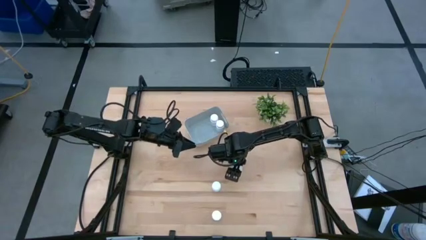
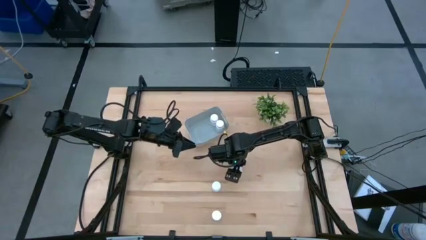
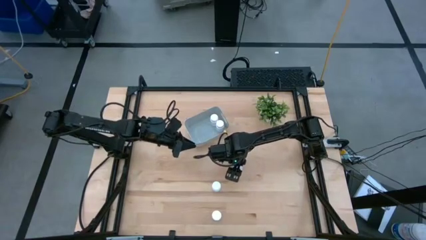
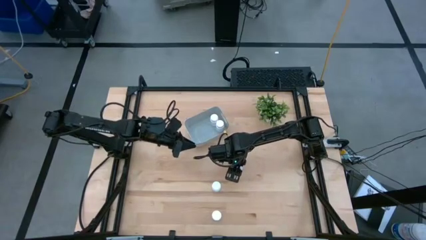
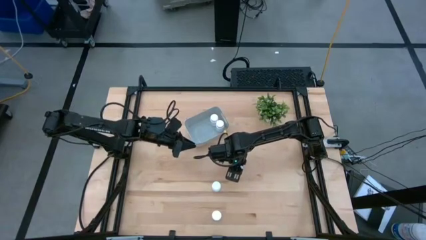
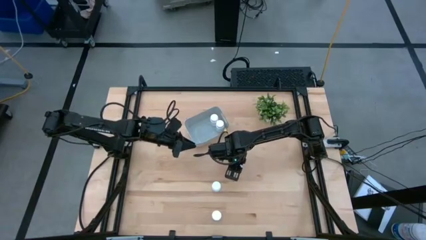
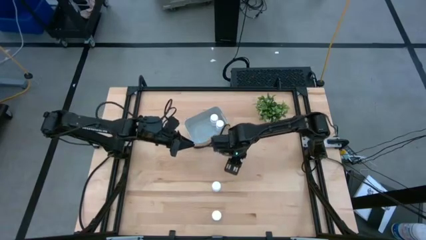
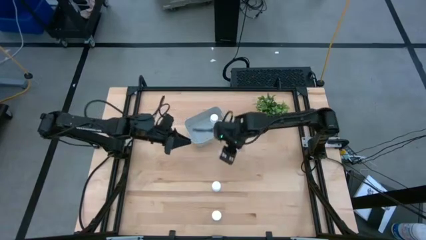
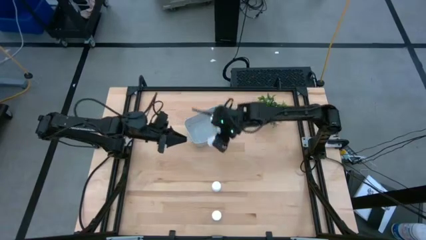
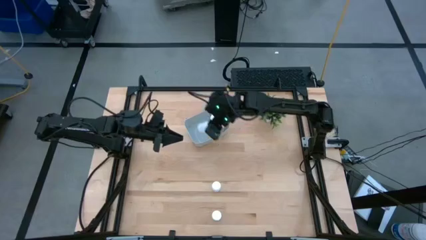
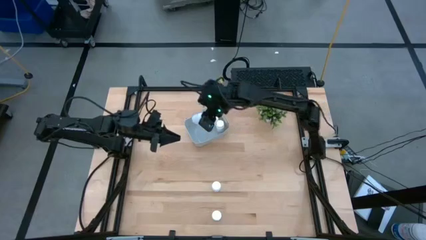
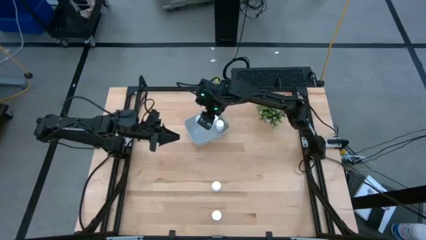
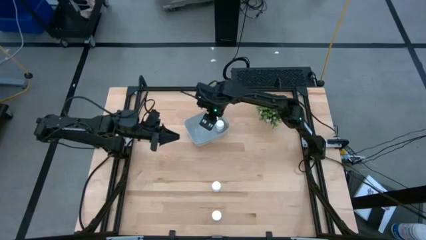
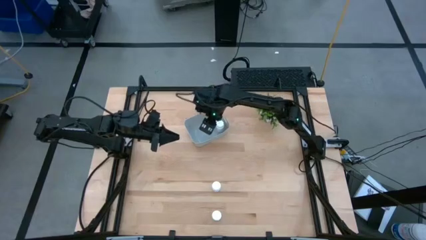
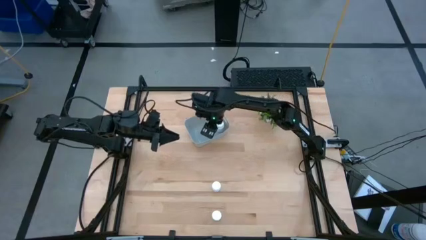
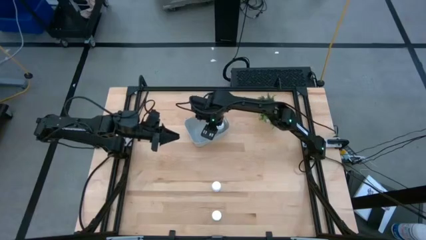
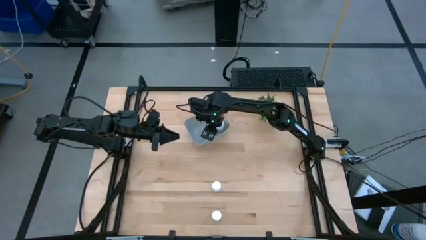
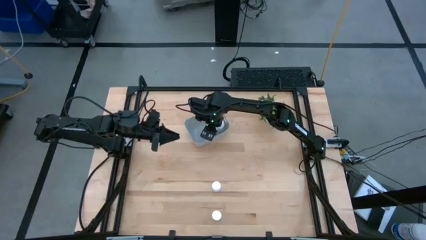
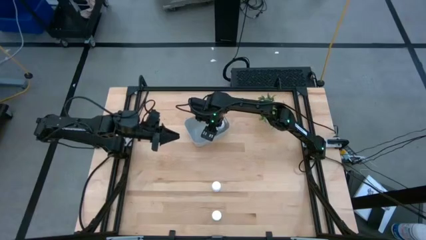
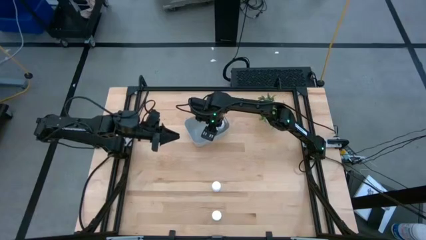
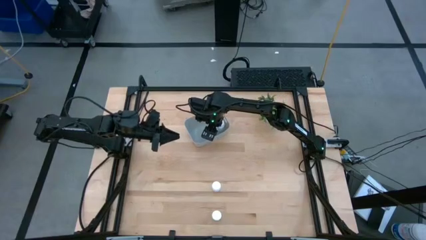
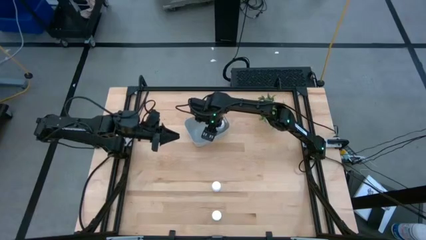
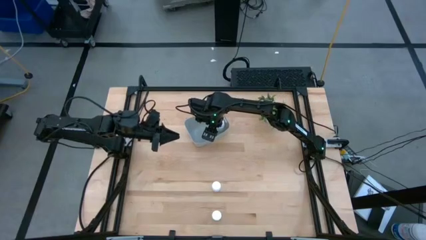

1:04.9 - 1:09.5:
Task: Pick and place pill bottles into a basket
Put the white pill bottle into the gray bin

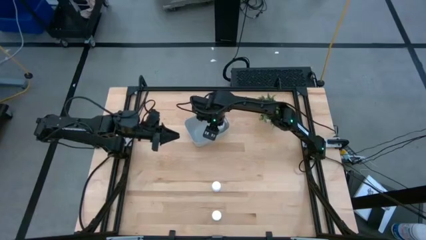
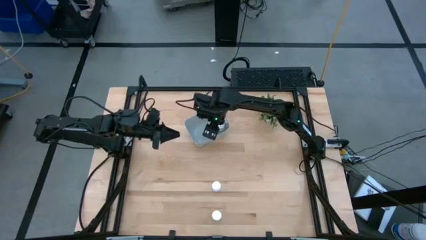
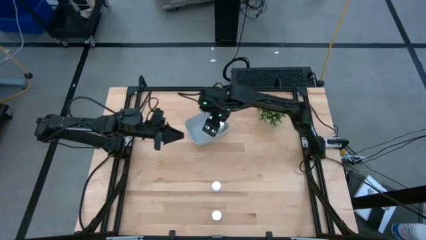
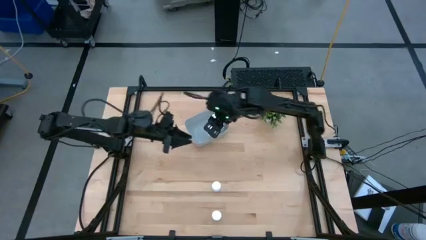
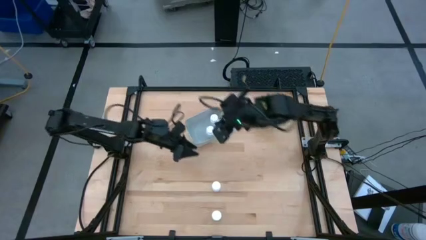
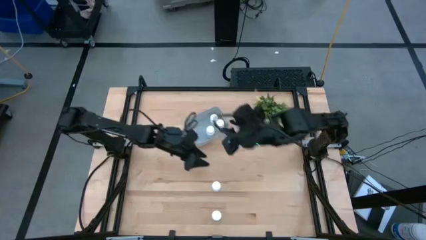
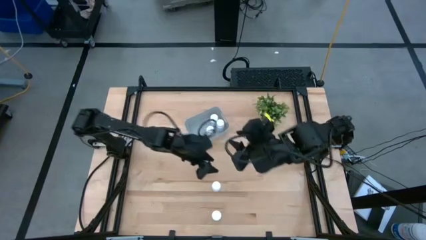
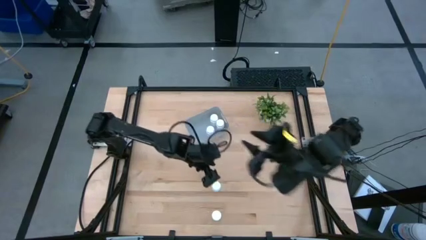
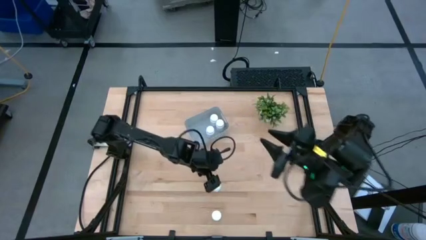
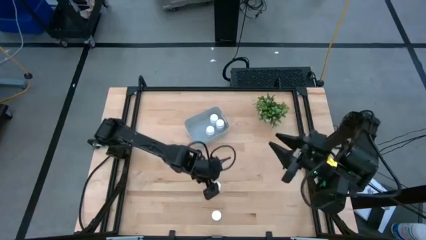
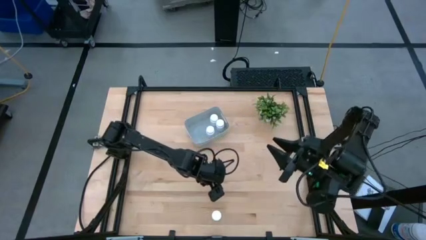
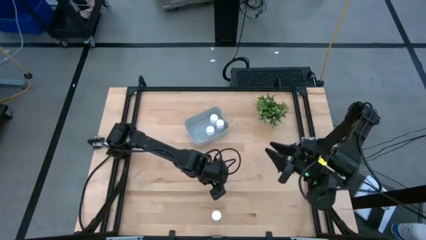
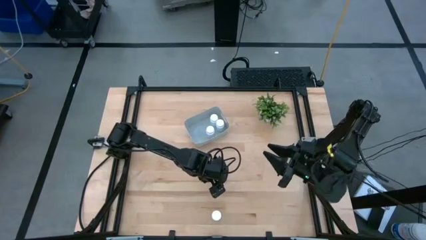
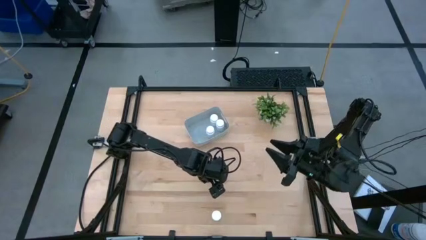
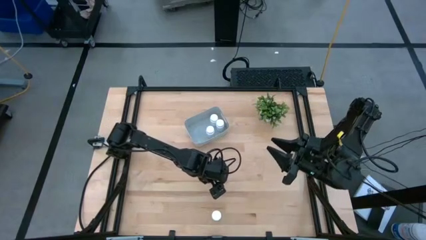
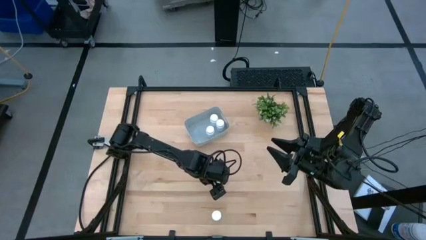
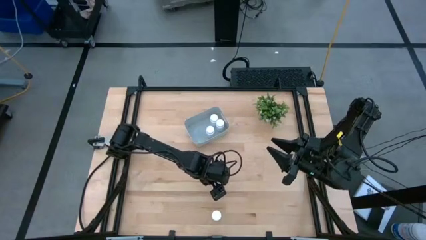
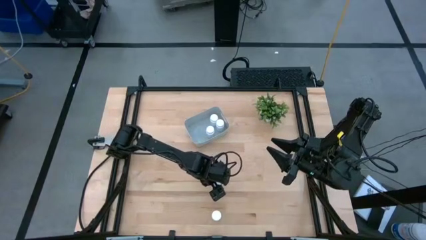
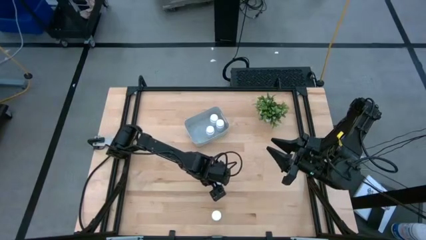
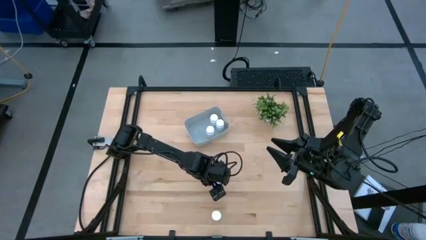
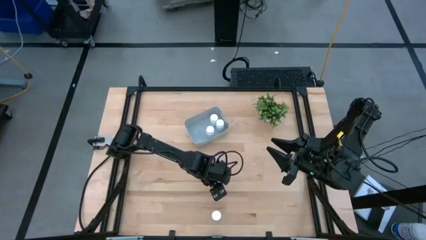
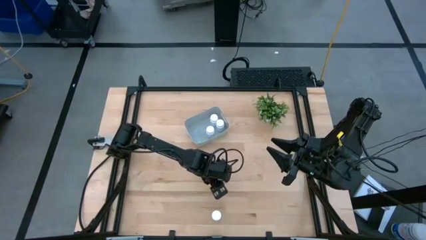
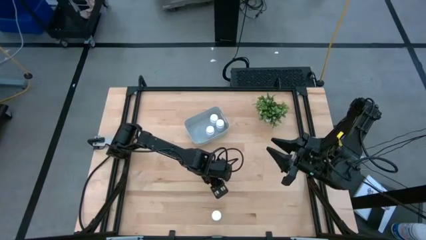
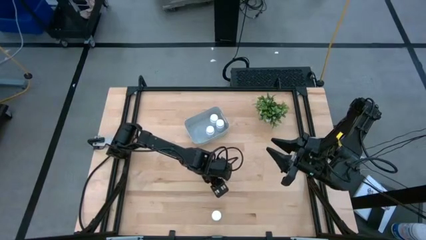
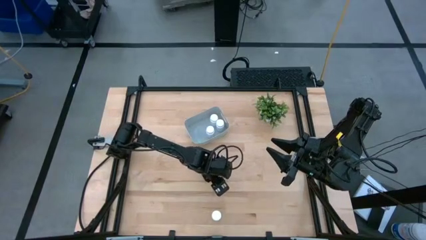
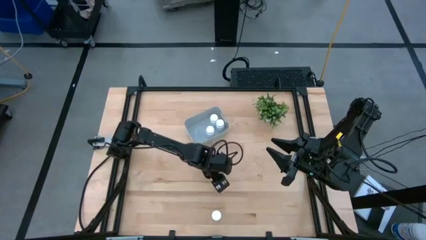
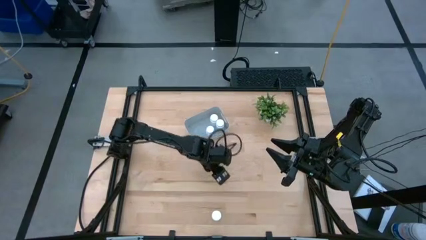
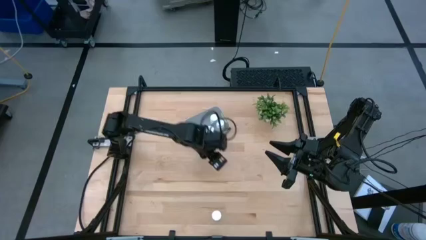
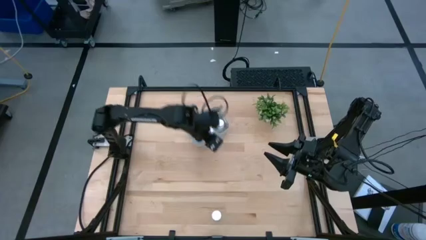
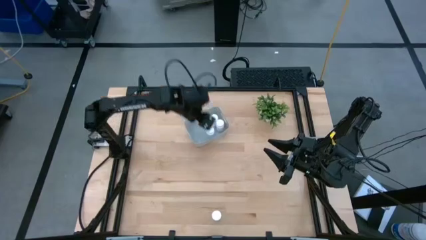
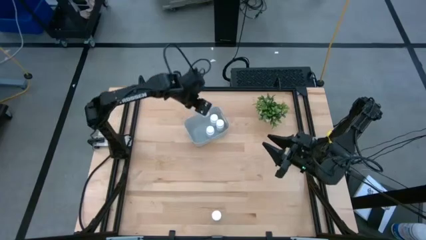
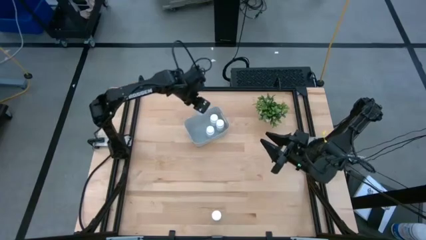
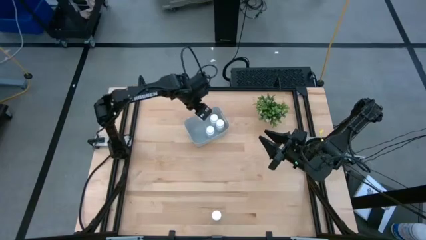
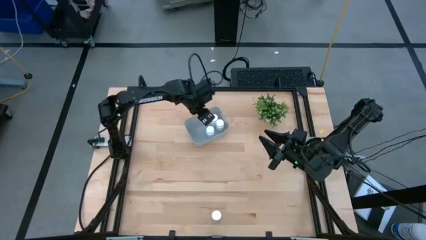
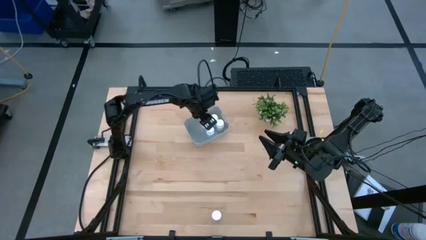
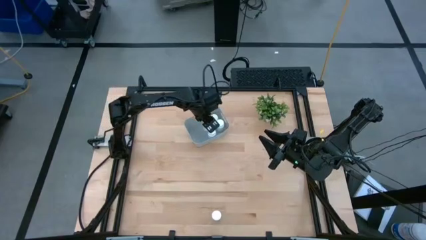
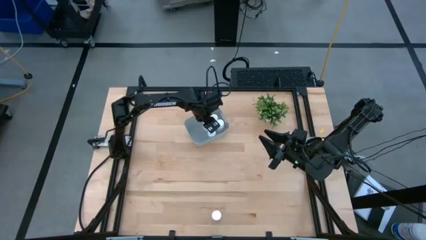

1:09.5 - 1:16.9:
Put the white pill bottle into the gray bin

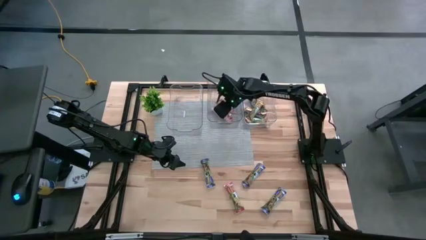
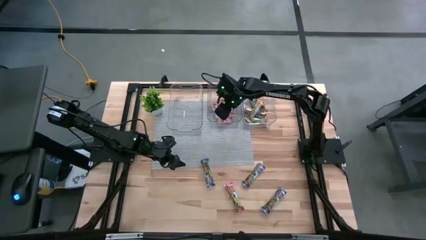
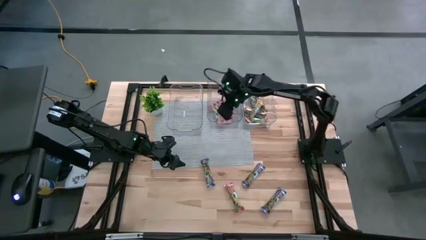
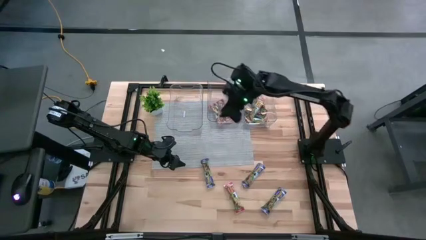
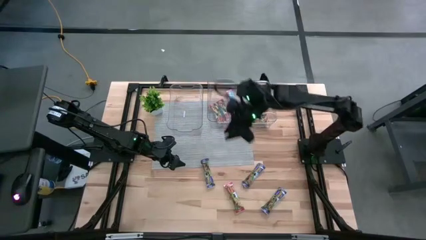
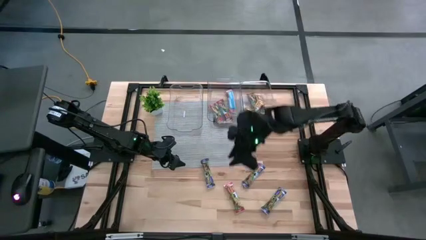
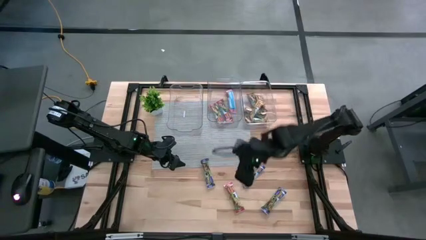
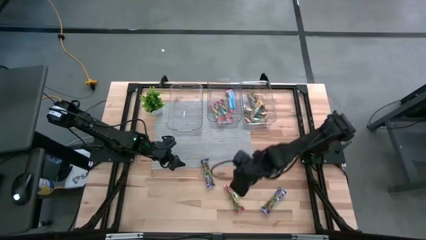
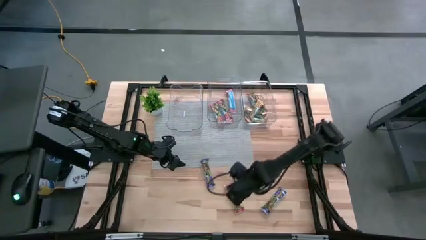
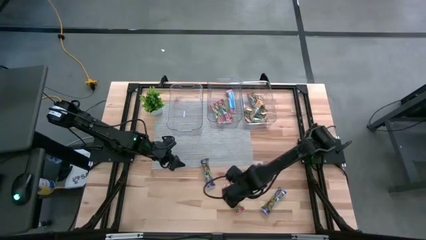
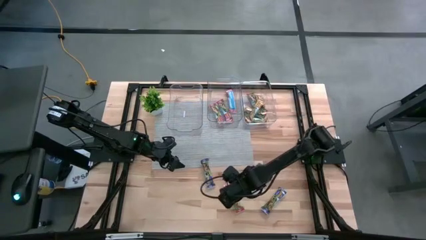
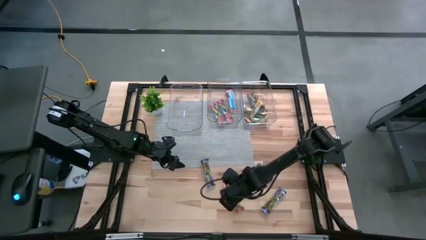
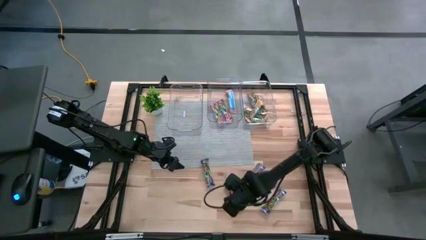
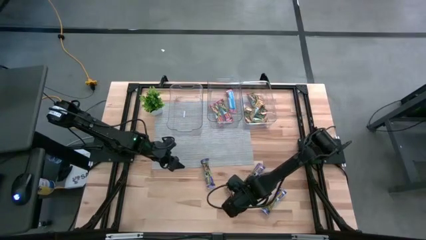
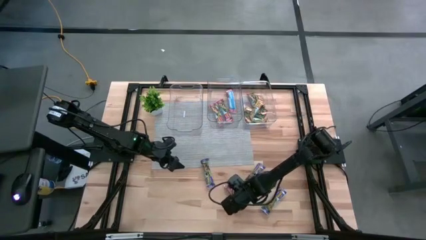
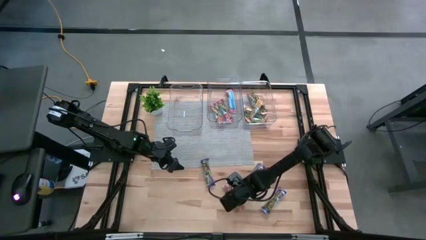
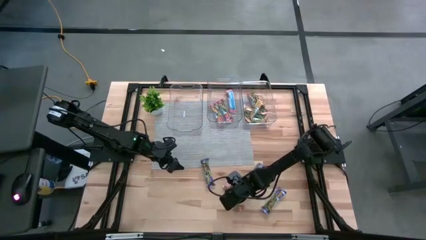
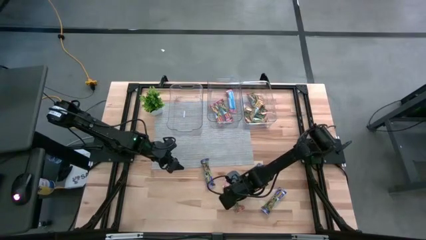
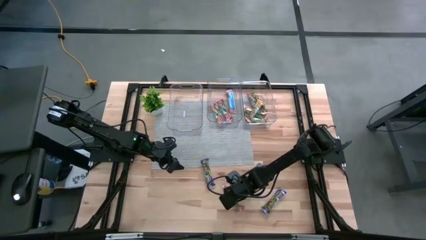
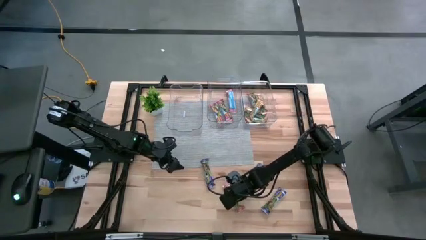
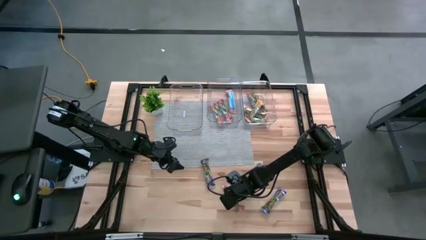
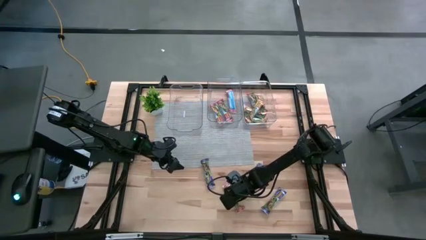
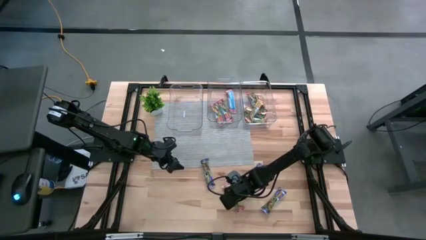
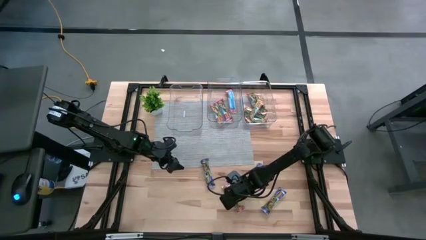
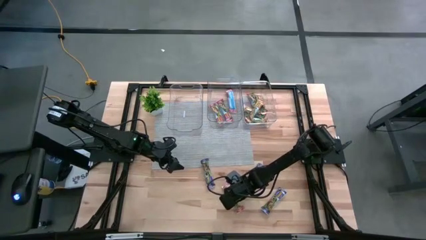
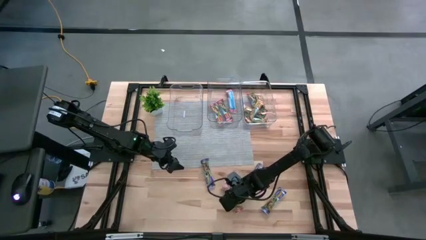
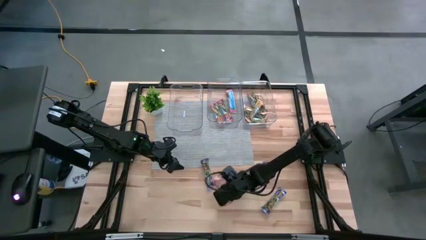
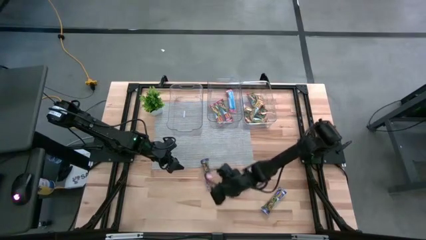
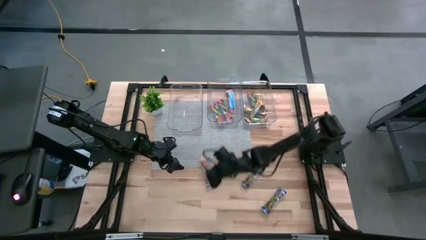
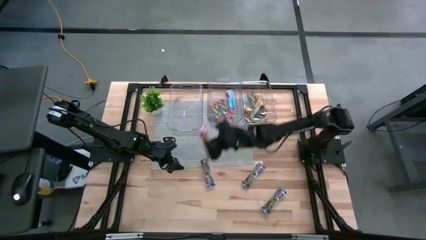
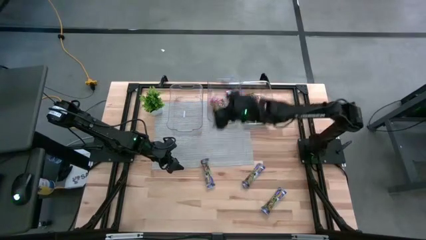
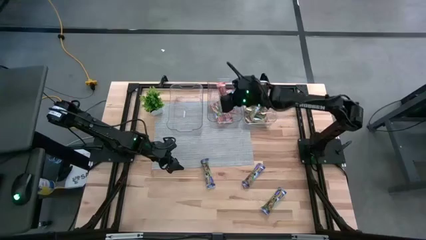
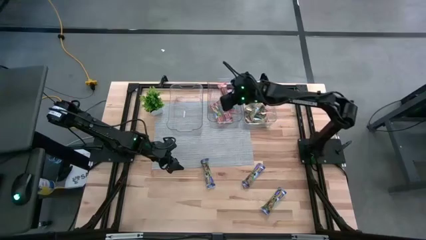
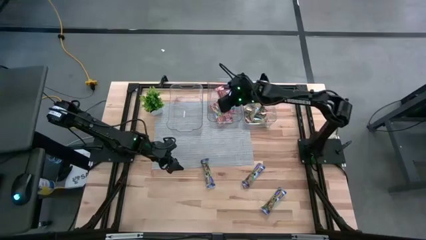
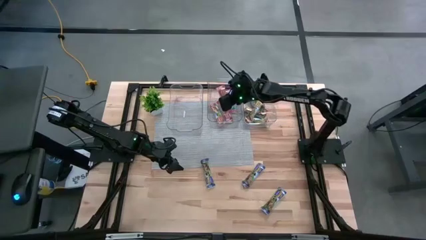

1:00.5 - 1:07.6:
Task: Pick and place Granola Bars by type
Put the red granola bar into the middle transparent bin
